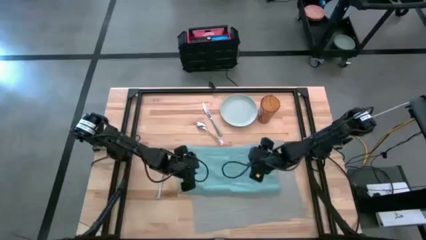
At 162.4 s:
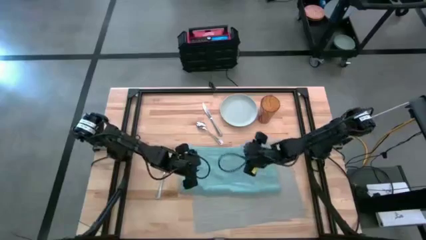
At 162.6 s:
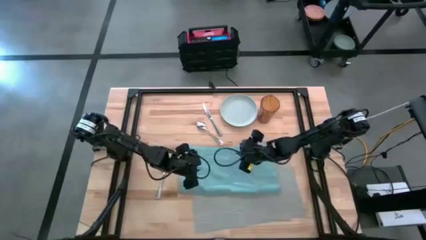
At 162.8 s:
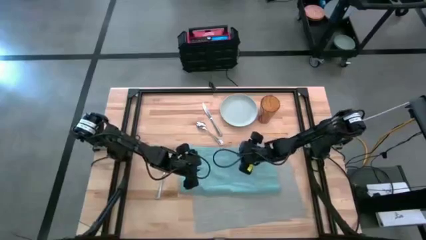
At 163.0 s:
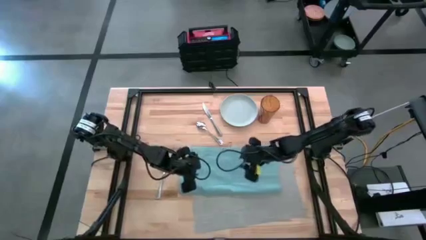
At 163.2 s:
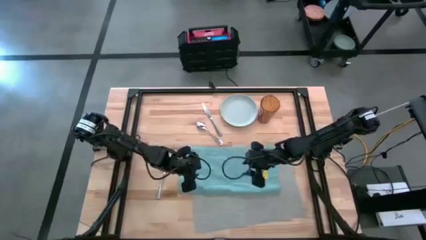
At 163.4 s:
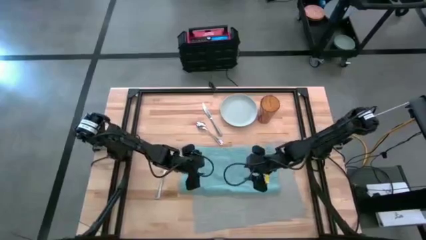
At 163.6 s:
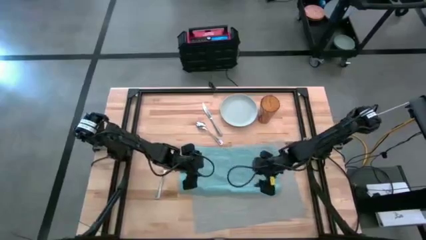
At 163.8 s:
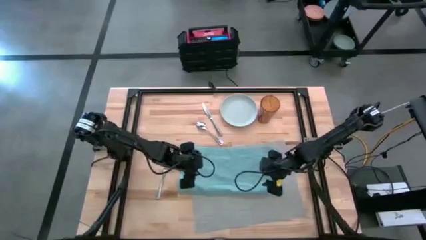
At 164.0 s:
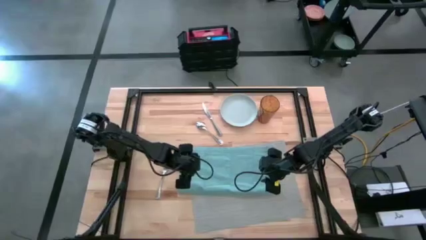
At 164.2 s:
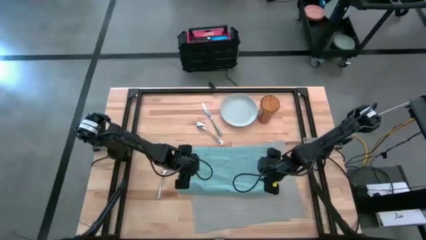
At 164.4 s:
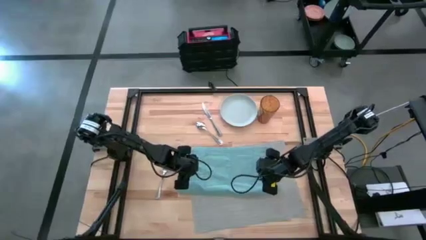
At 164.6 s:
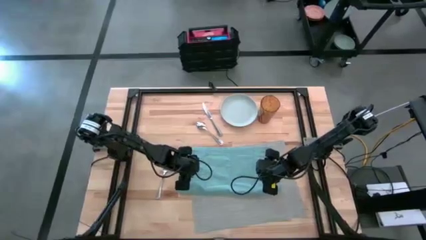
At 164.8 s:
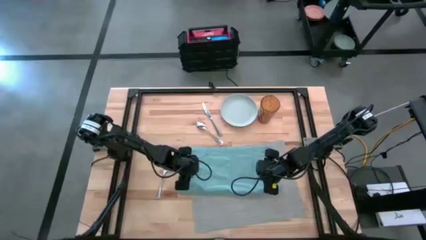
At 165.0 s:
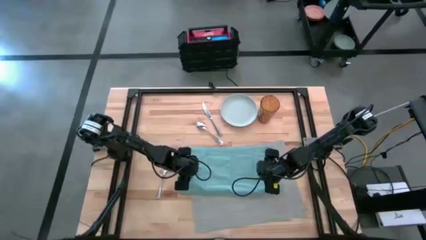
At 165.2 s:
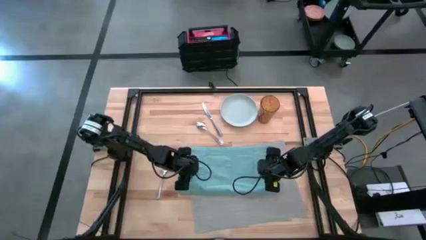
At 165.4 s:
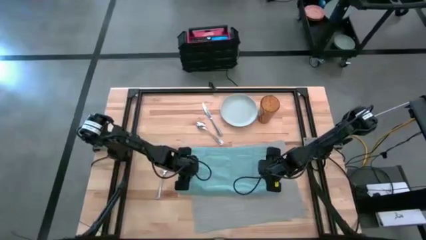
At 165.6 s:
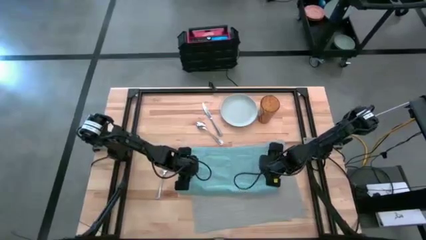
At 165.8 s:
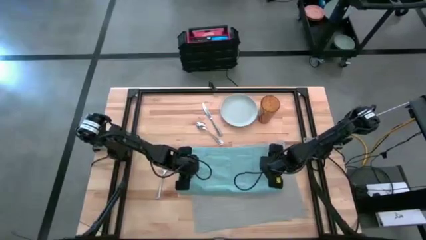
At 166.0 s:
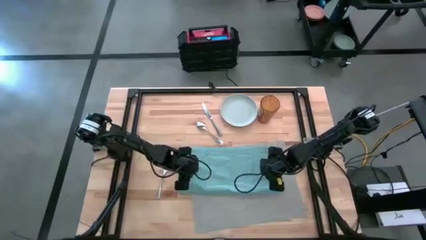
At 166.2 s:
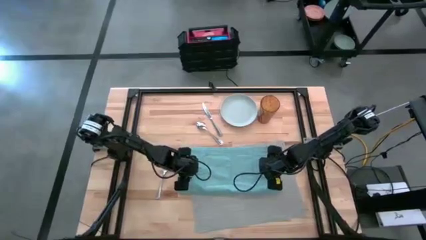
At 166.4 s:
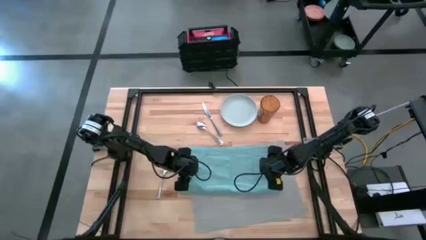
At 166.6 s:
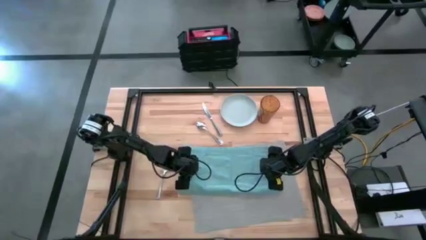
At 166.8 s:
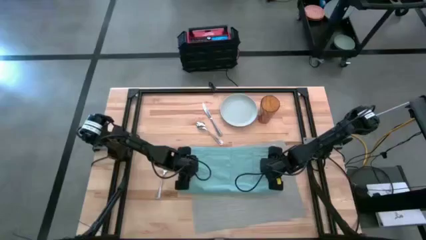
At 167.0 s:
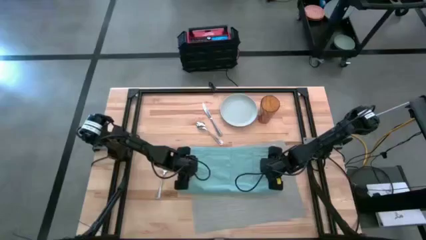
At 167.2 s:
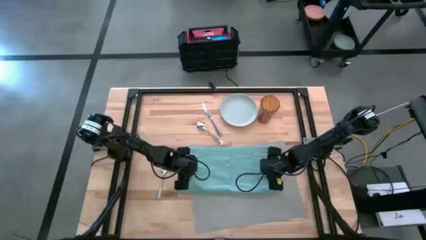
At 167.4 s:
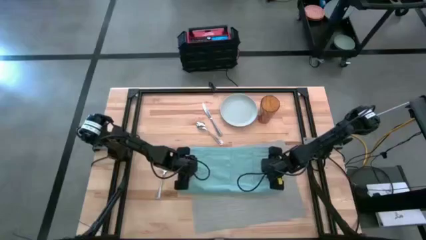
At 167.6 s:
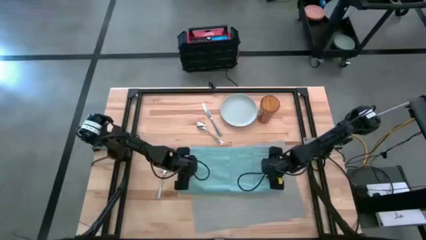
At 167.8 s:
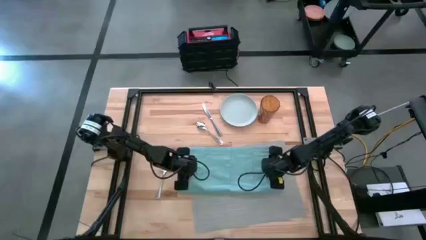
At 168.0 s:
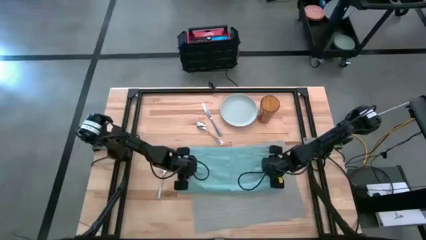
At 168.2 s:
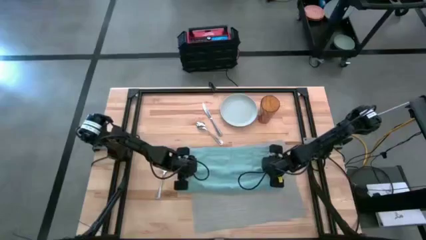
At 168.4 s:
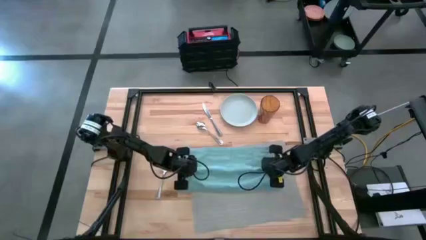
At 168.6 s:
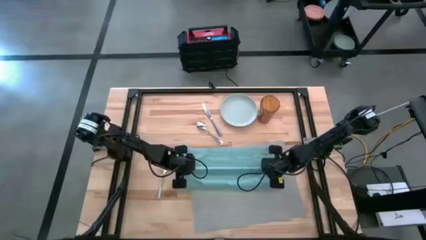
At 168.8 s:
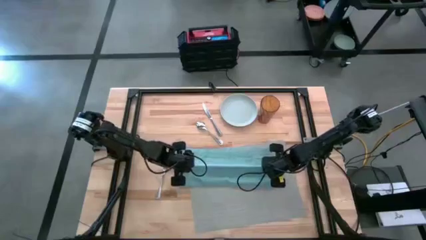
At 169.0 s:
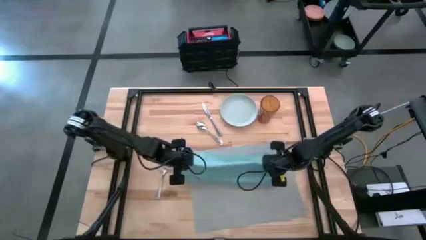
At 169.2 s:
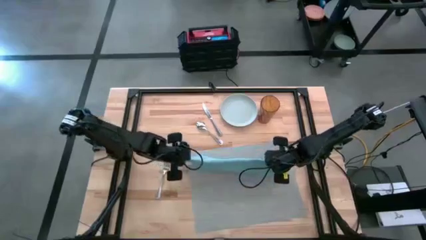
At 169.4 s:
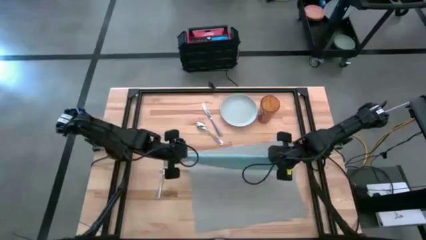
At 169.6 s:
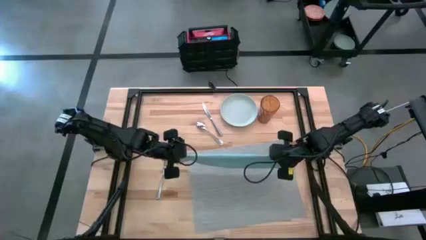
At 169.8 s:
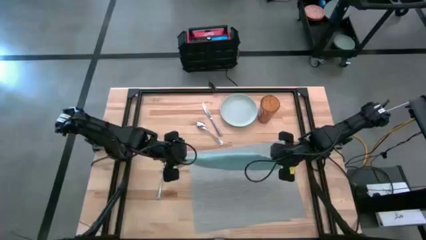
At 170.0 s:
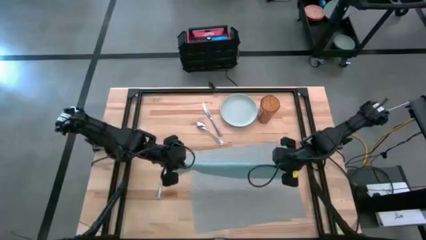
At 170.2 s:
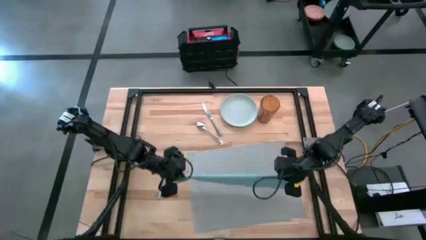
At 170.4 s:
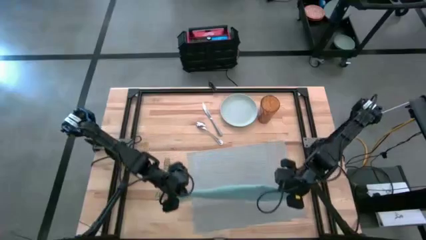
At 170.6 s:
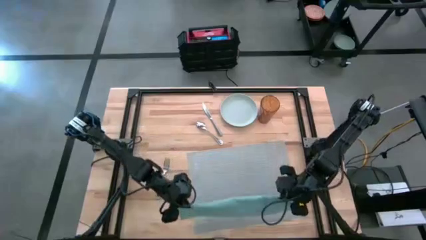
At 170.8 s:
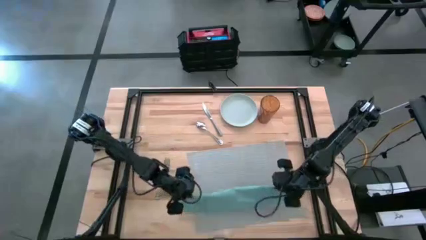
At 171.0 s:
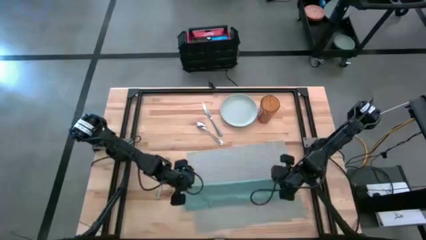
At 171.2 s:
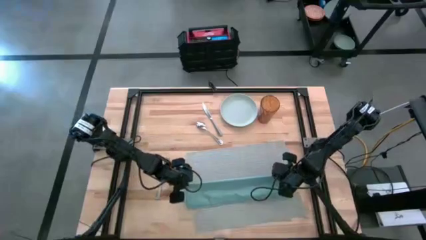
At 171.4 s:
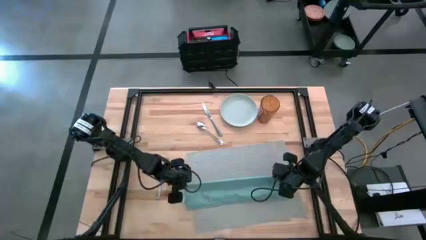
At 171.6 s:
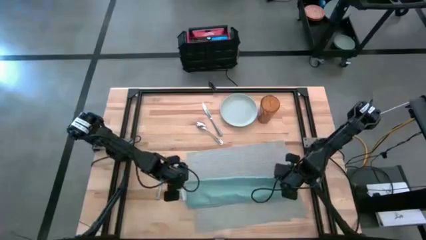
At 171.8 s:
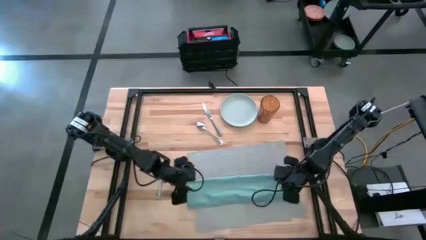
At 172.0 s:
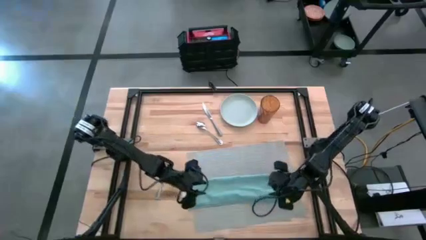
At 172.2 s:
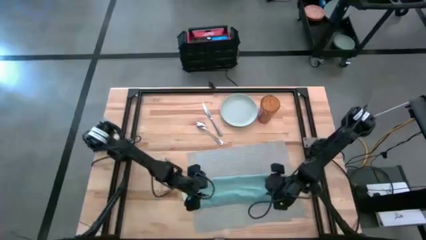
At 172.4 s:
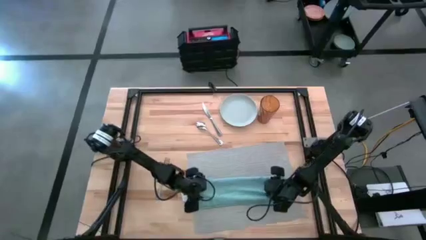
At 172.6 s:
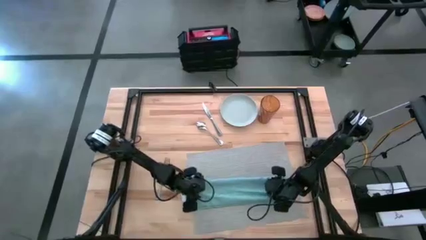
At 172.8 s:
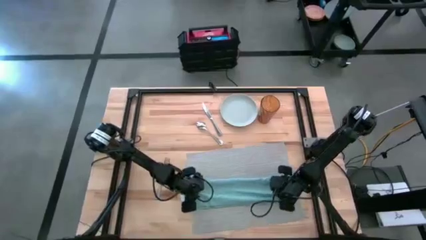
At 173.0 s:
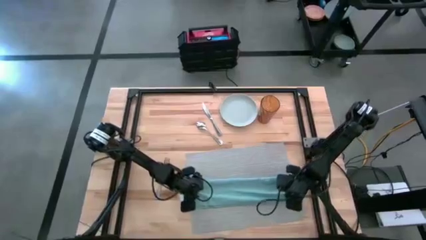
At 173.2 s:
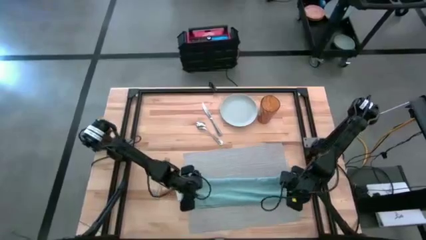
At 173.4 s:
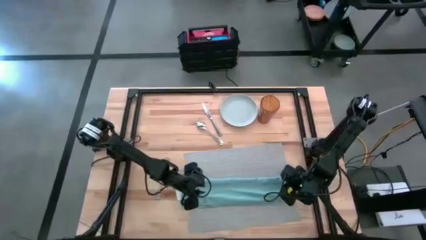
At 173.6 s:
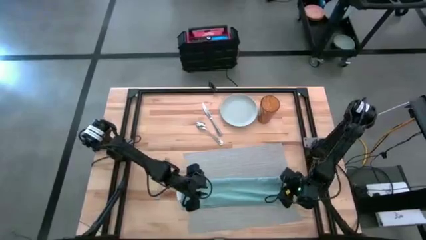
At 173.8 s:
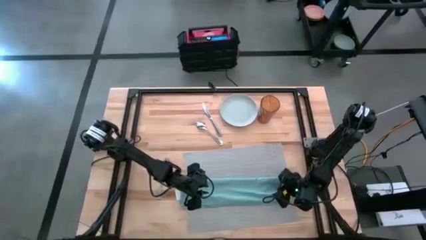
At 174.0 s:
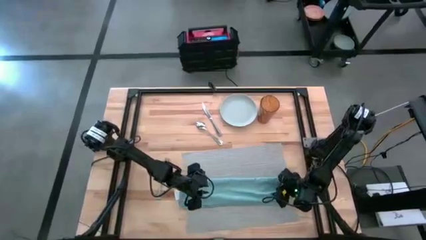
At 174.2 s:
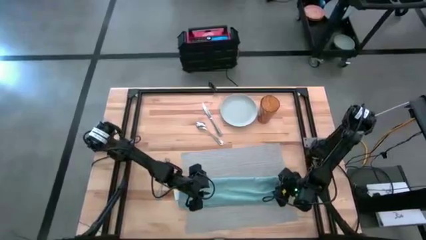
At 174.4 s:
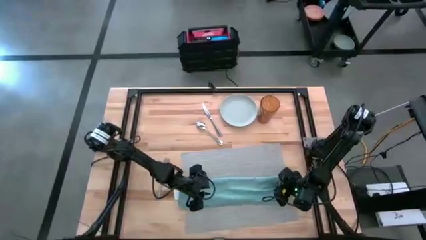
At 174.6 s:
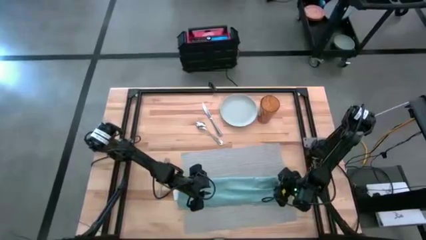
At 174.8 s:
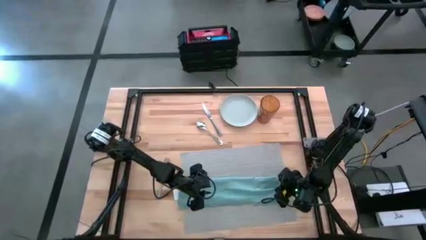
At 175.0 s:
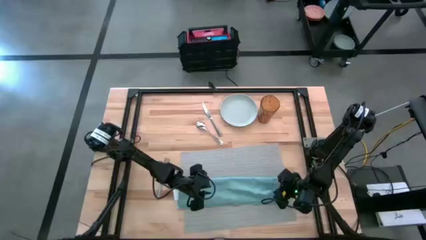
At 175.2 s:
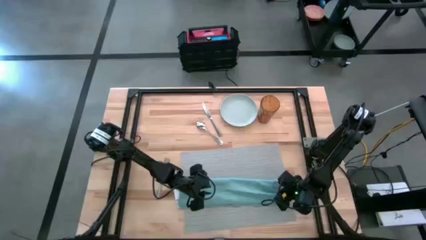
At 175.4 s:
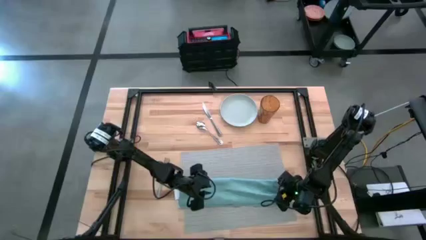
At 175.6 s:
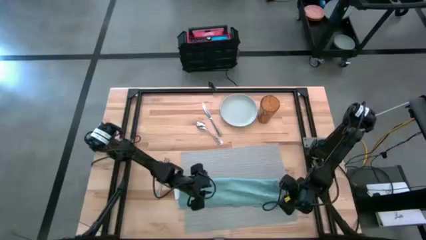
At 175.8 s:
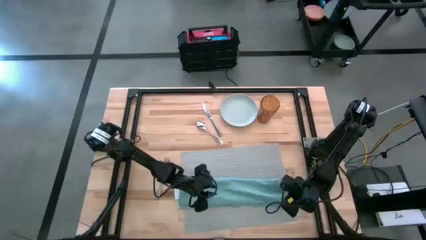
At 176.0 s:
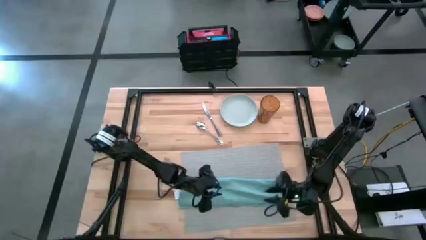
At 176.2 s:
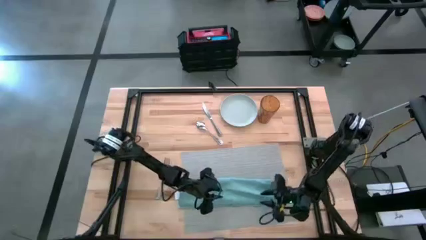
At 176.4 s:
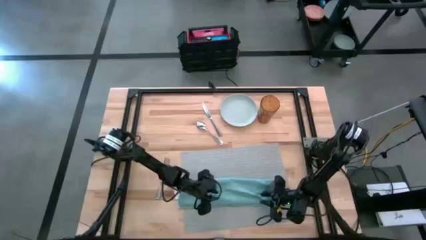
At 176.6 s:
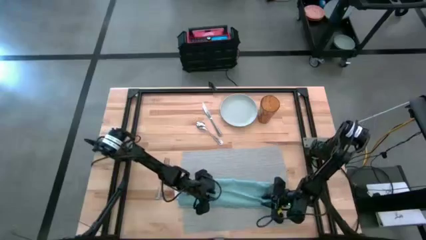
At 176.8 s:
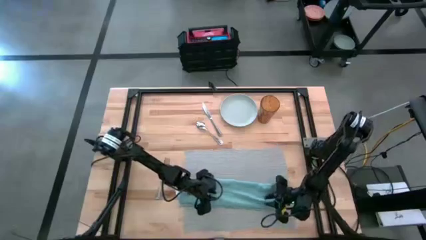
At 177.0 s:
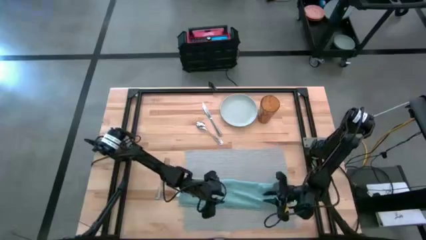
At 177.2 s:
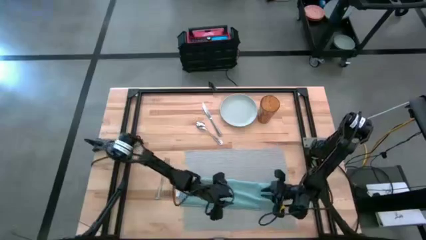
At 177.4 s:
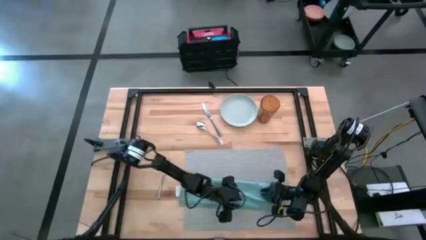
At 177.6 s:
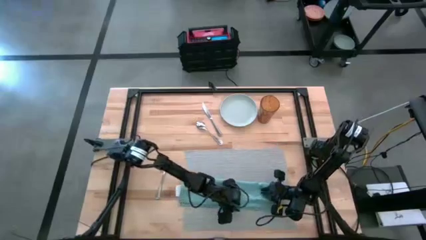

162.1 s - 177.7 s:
Task: Set table place
Fold the blue napkin on the gray placemat
